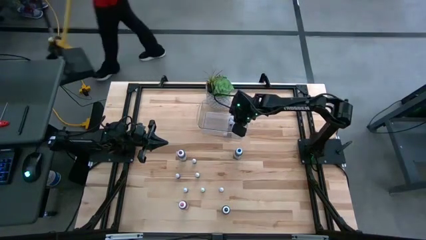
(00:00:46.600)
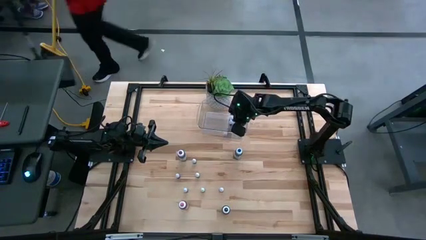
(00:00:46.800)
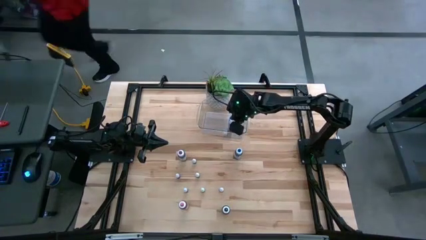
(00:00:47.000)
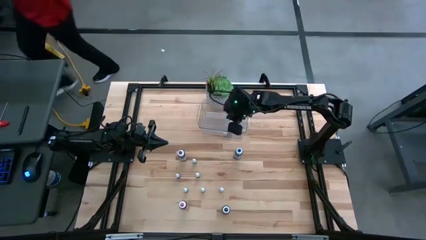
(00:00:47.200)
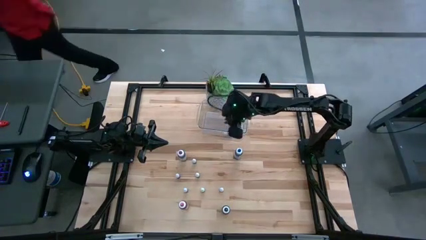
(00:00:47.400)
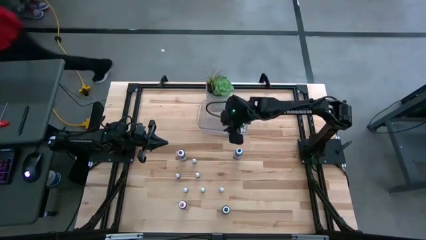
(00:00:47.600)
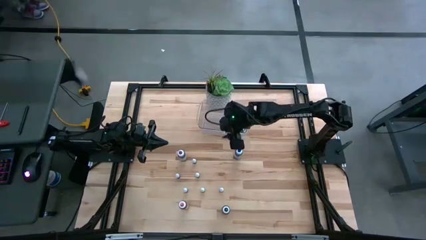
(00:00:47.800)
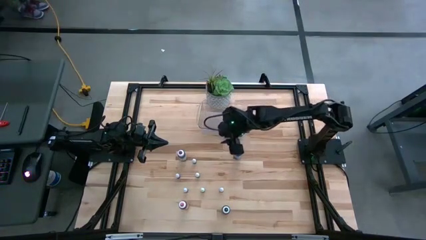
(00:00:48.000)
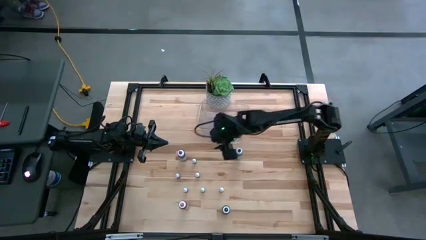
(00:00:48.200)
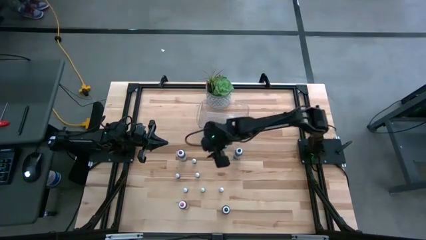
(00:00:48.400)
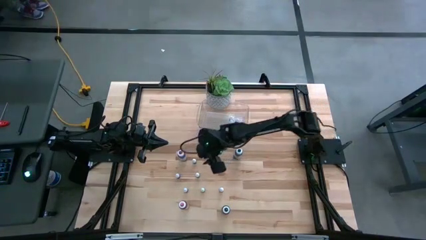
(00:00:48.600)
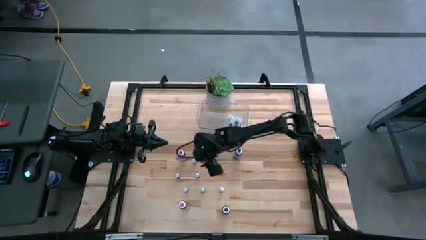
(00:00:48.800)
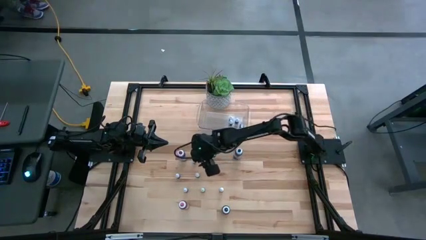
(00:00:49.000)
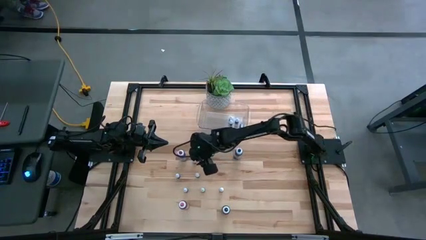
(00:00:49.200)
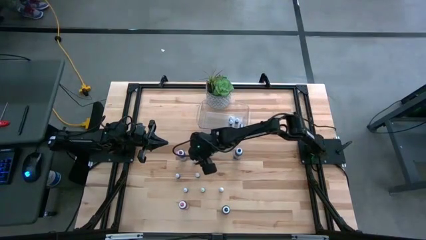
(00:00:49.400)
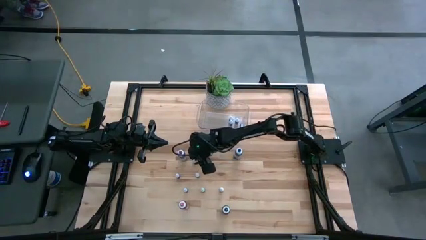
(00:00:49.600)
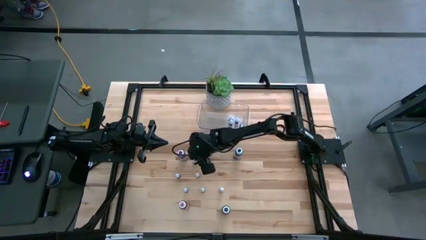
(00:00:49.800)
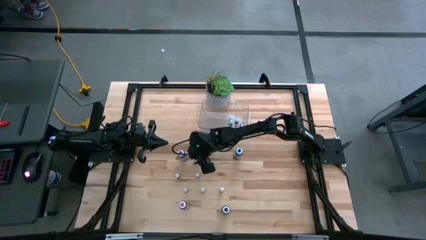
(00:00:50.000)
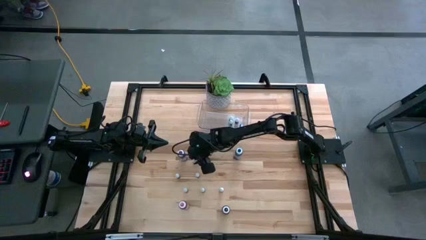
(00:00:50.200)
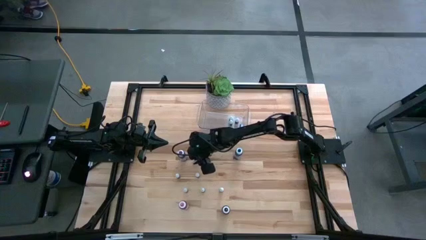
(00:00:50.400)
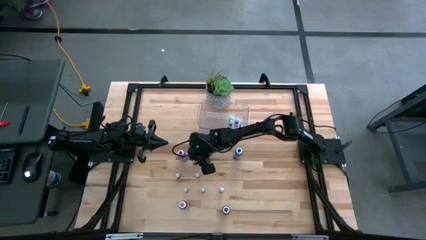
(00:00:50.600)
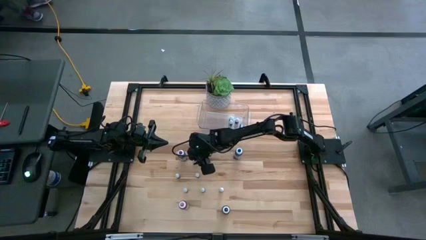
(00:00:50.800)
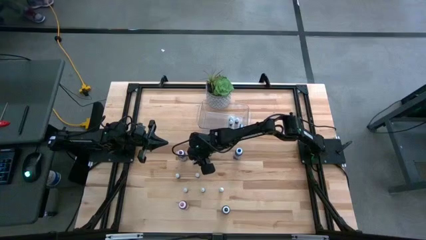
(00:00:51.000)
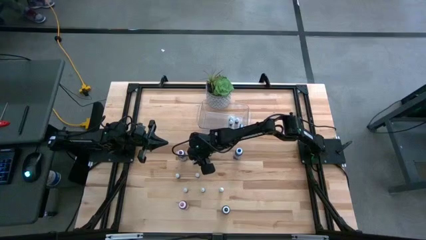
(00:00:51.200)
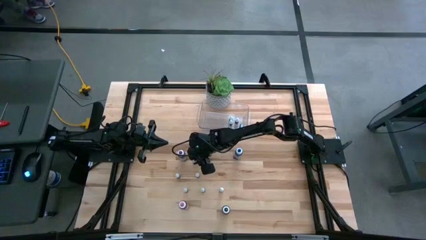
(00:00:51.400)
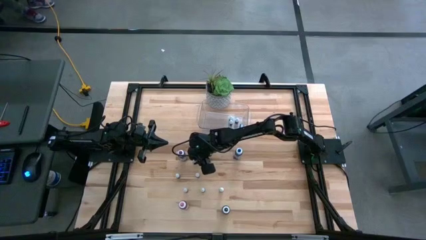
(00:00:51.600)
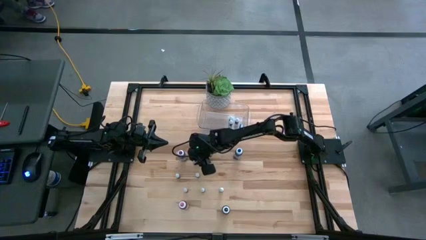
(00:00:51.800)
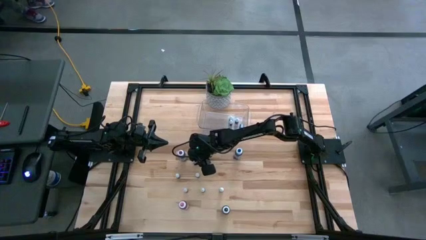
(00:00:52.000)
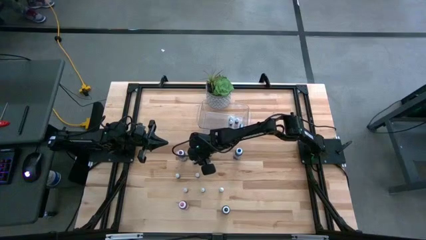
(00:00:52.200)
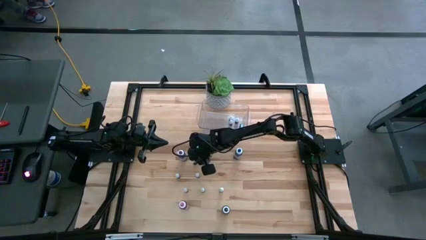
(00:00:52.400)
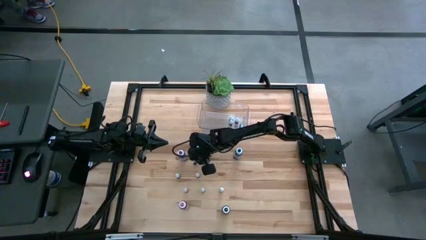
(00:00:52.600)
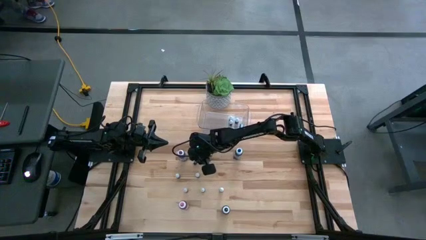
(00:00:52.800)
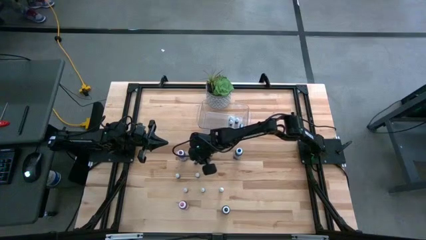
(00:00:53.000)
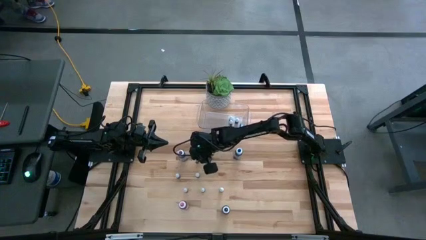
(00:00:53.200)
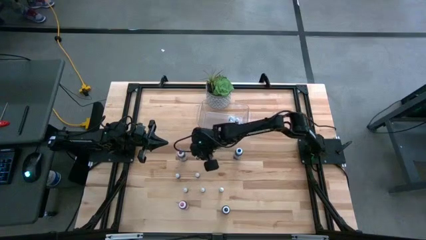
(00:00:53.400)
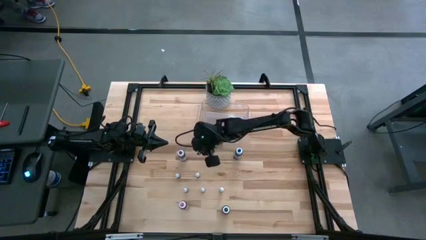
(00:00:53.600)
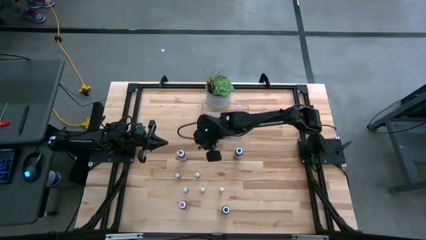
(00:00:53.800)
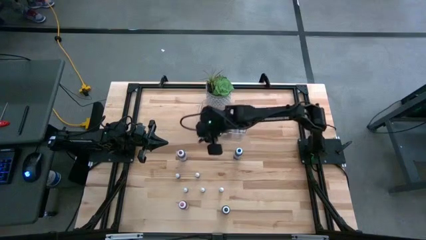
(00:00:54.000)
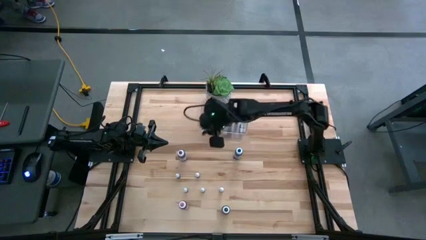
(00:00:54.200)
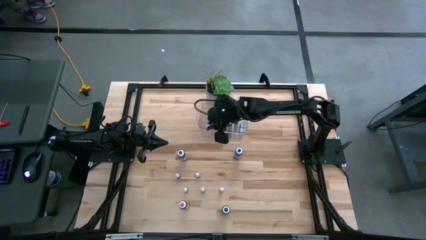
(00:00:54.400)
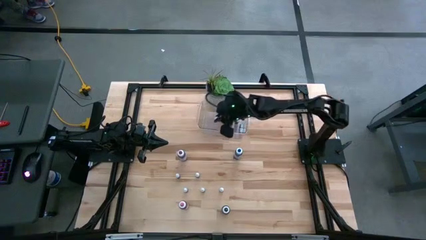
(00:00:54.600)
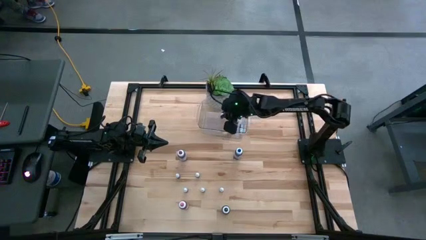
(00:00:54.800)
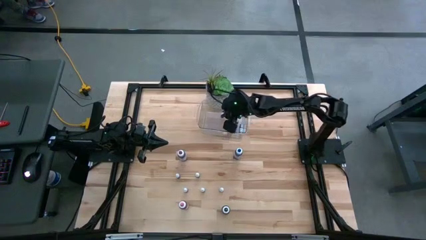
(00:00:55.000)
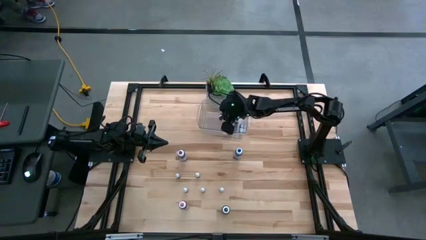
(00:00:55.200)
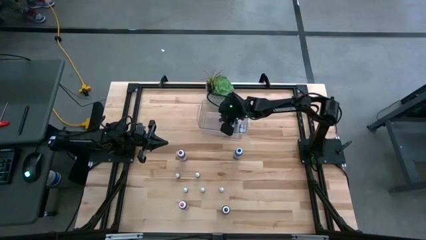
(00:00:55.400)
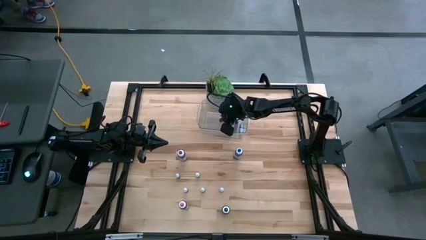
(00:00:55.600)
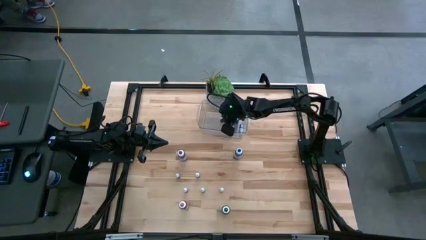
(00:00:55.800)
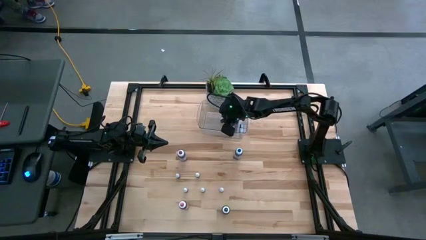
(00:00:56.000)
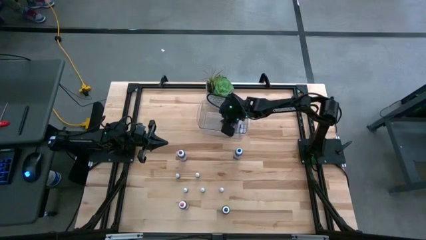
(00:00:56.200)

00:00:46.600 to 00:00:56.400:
Task: Pick & Place food coloring
Put the small black food coloring bottle into the bin

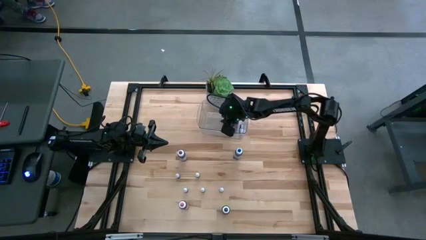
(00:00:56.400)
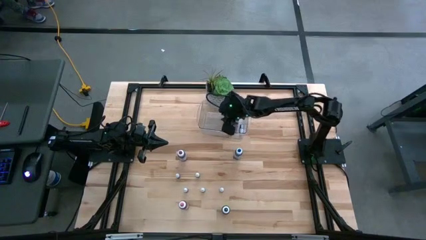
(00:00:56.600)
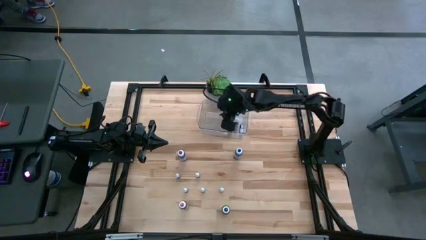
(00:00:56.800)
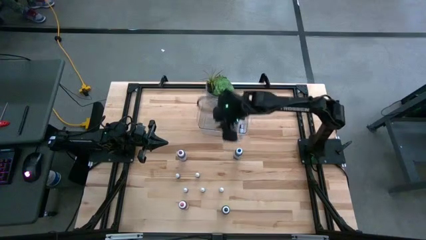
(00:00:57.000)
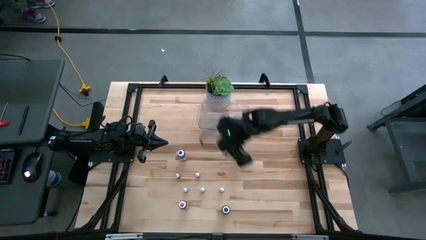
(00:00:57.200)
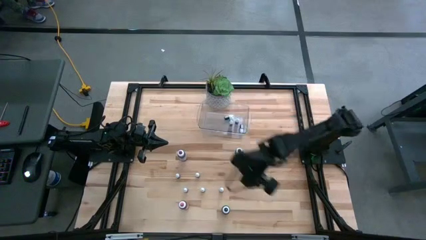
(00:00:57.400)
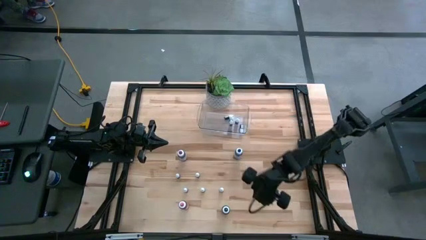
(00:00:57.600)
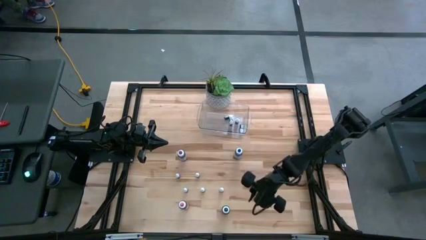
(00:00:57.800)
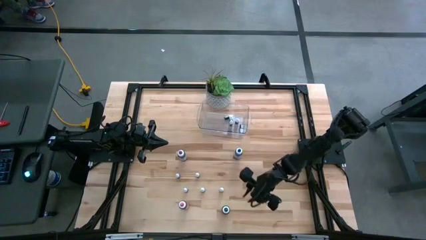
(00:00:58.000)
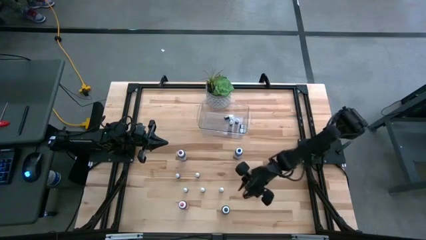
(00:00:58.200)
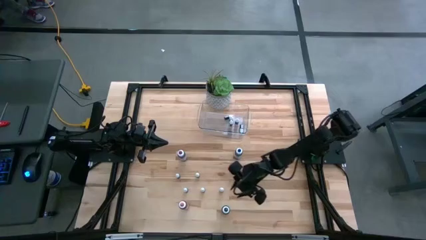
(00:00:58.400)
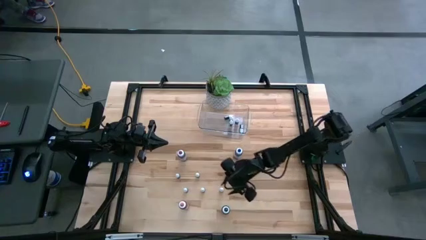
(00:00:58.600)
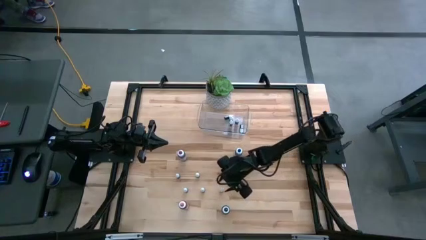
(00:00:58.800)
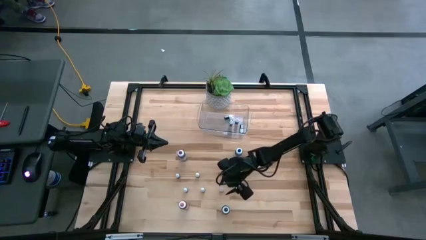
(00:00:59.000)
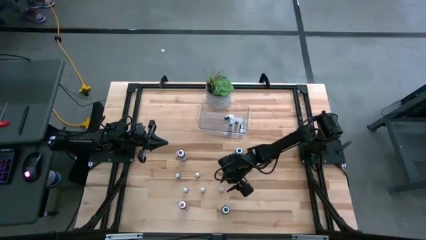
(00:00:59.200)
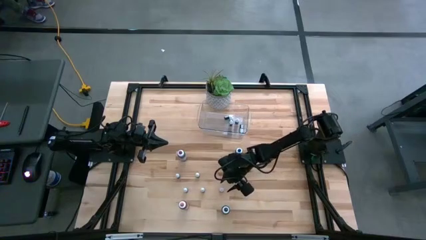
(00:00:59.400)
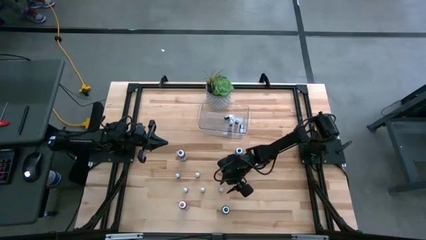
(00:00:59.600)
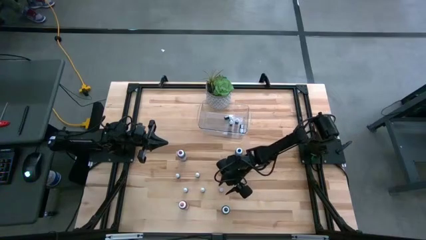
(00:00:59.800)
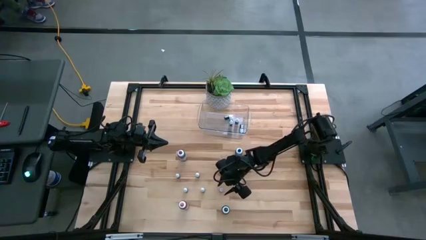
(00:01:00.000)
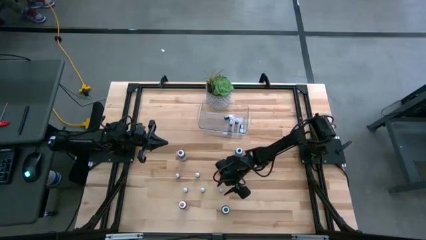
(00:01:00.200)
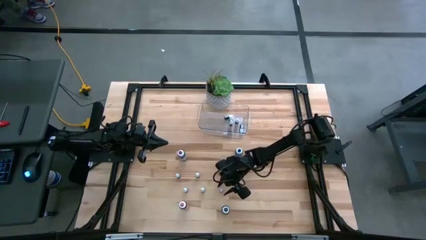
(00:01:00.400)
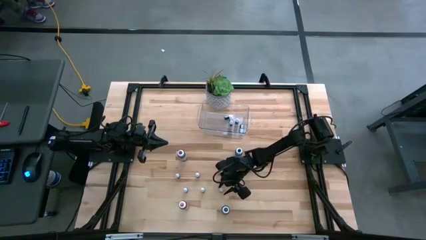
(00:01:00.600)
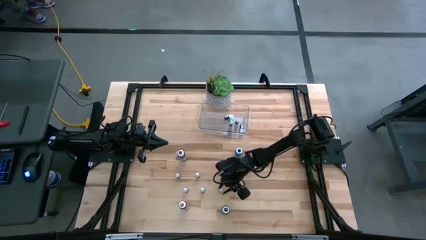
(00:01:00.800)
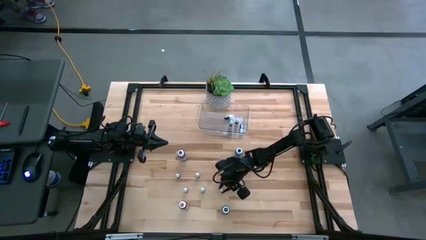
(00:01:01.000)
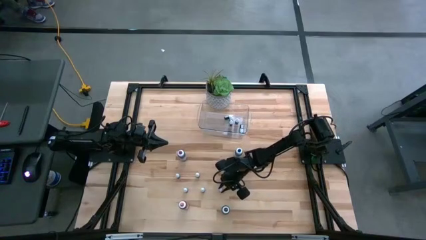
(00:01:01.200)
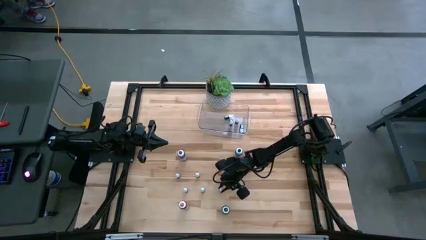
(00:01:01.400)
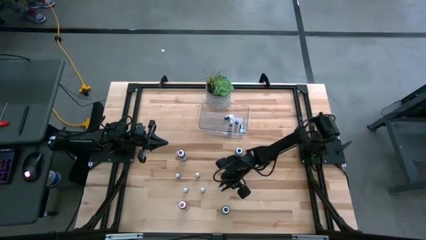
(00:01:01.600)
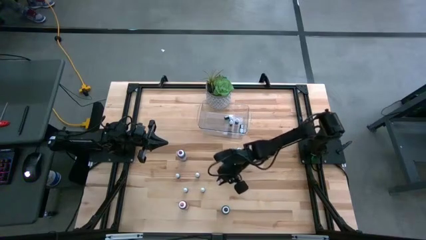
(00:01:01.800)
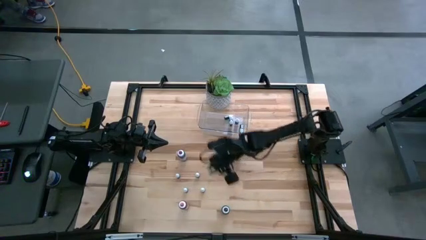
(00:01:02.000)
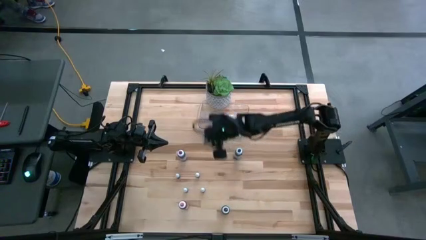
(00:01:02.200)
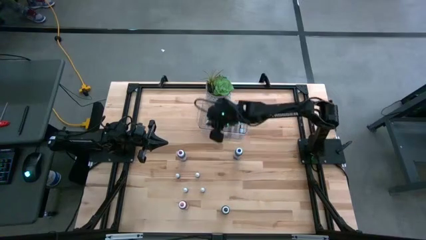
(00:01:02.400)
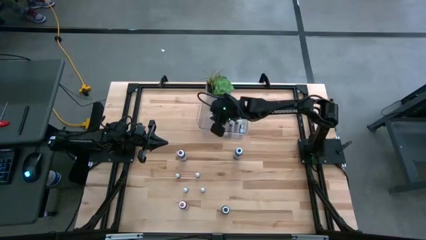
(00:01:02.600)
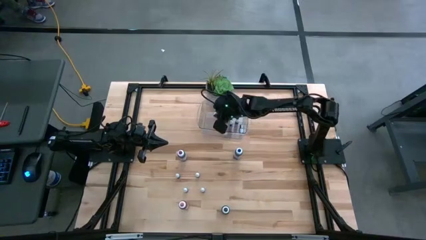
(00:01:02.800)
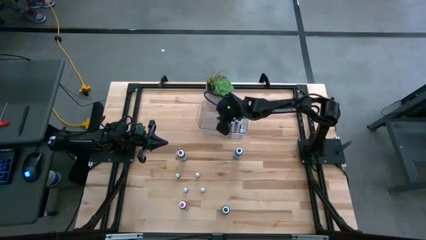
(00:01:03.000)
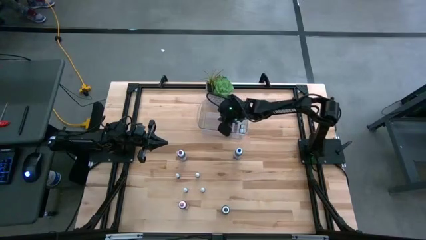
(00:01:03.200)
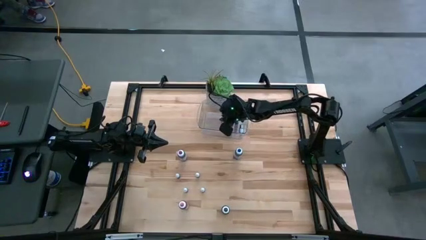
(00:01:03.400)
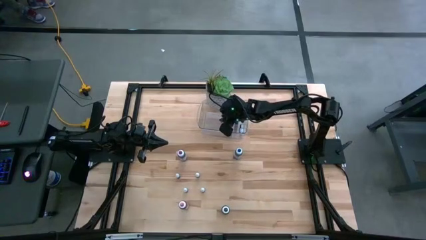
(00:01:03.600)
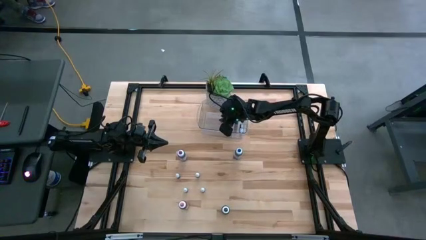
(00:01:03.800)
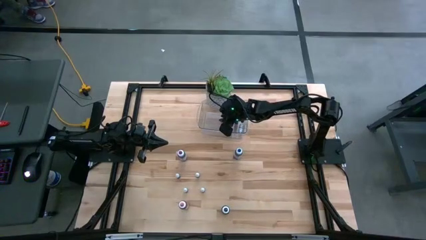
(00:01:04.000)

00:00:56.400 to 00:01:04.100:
Put the small red food coloring bottle into the bin
